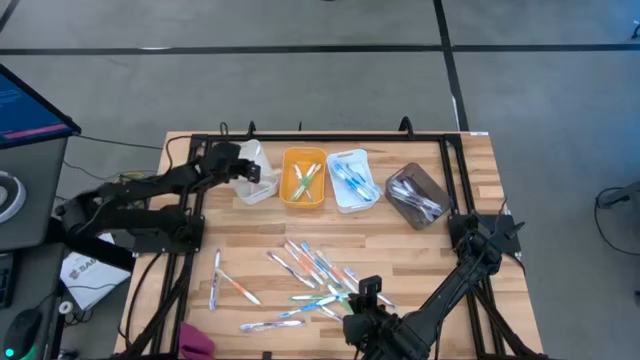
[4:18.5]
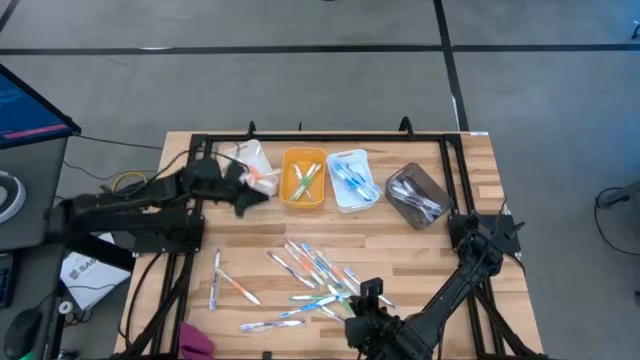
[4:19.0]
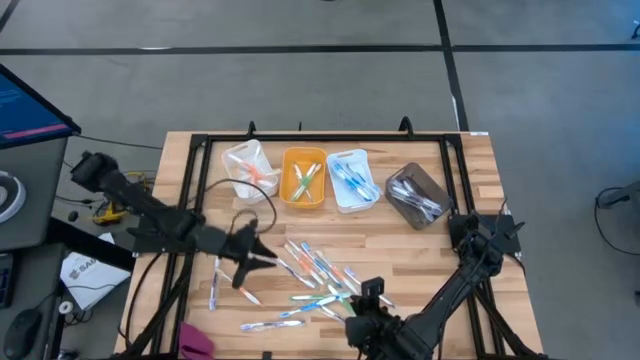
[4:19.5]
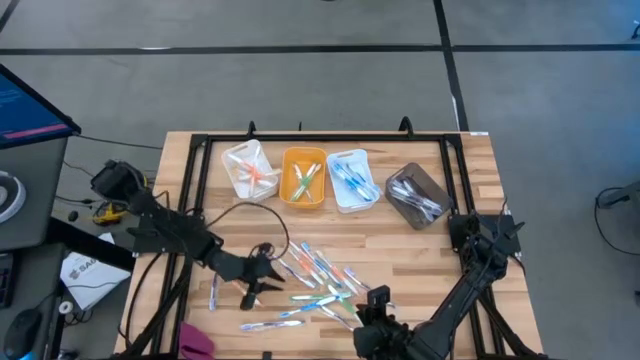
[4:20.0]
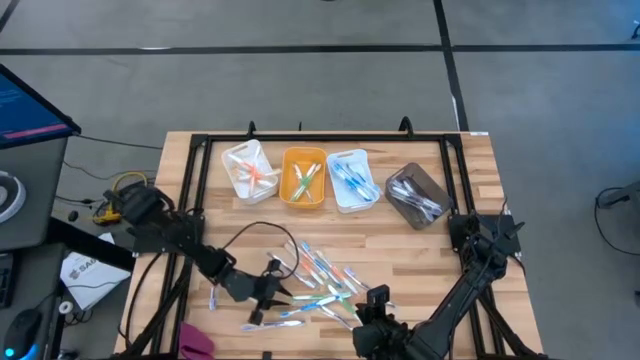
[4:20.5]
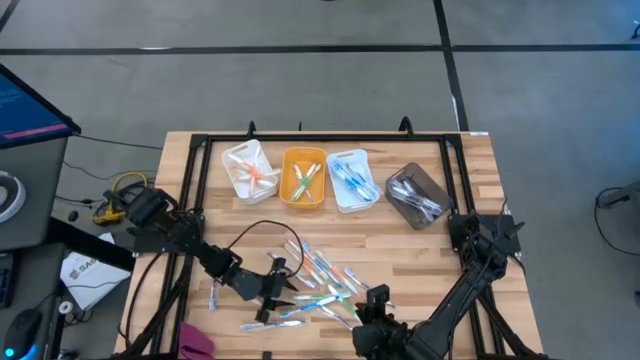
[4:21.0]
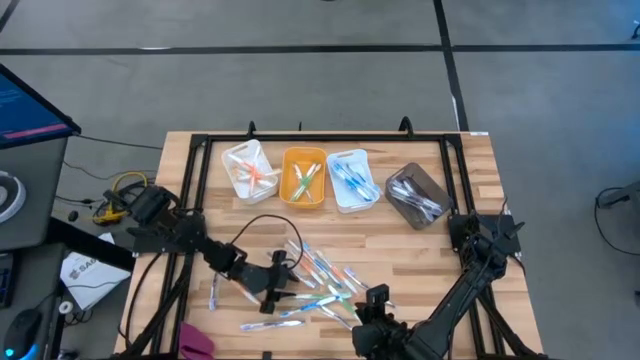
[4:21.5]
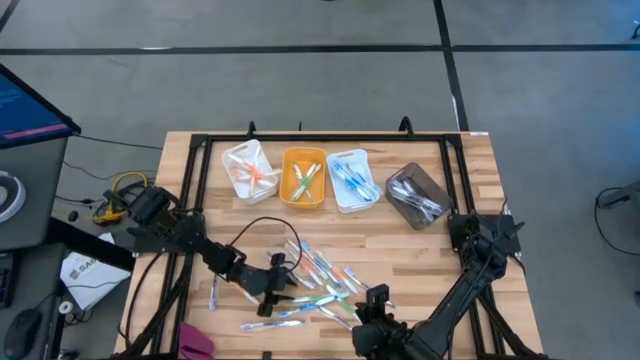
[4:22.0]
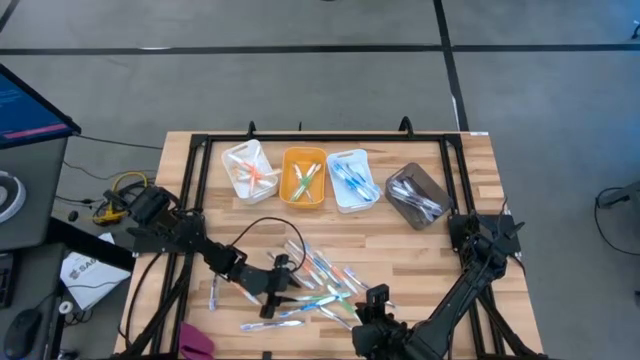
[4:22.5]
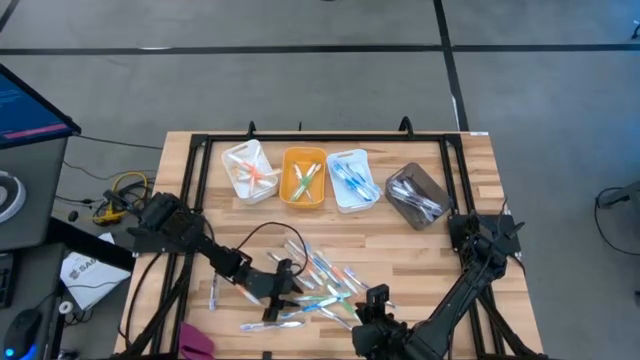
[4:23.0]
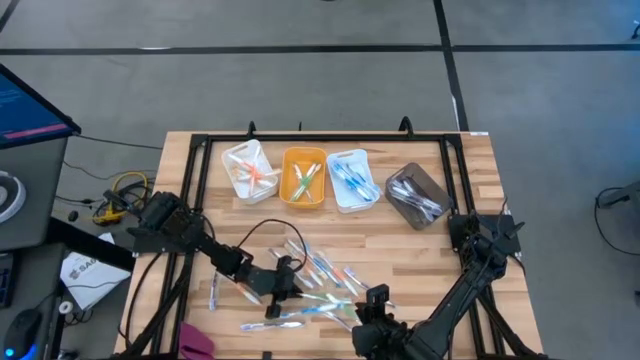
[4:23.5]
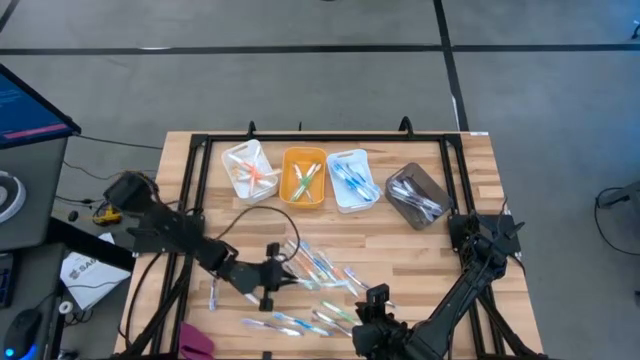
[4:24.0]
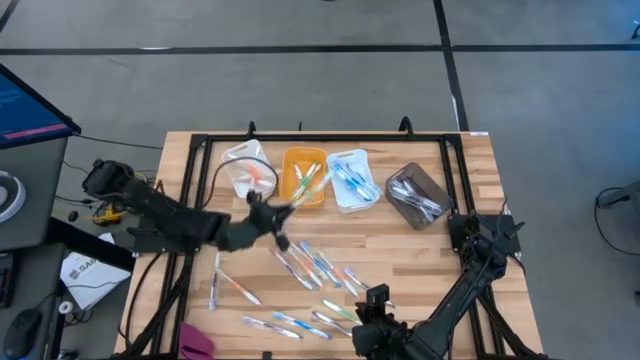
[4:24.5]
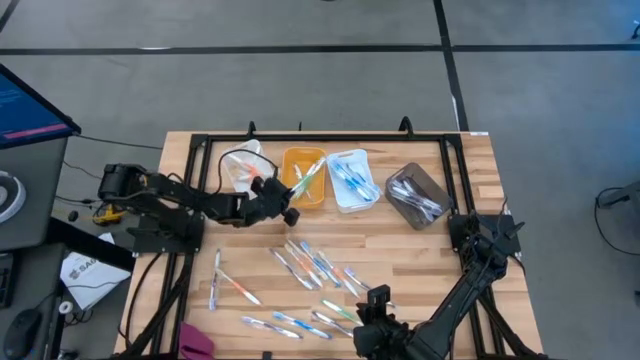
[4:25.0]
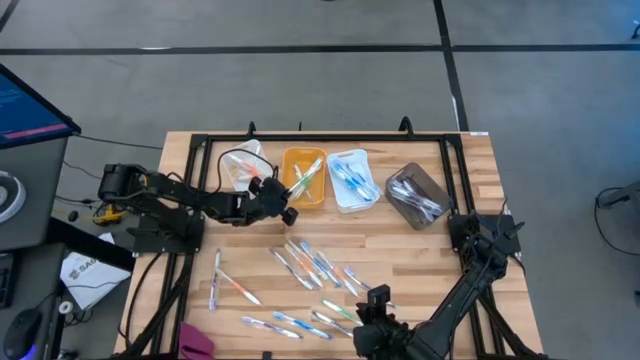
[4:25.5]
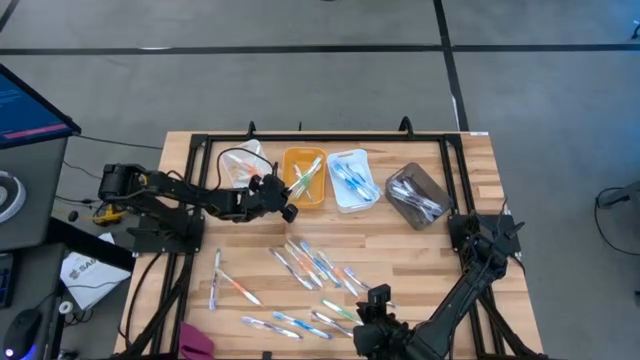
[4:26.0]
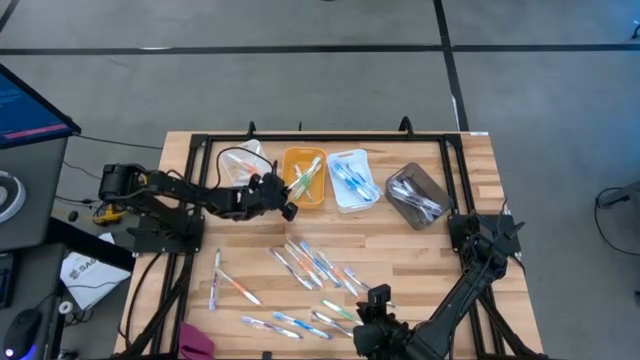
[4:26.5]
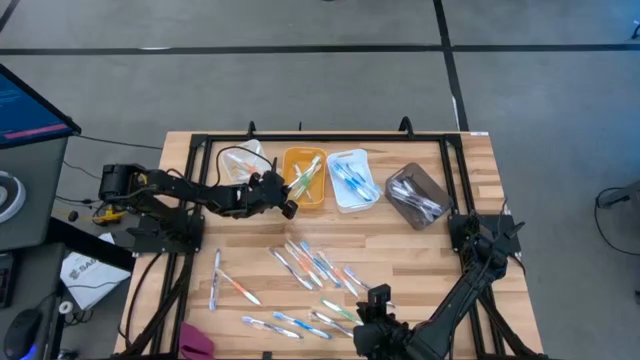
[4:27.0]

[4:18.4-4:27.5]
Task: Pick & Place Toothbrushes
Put the white green toothbrush into the yellow bin

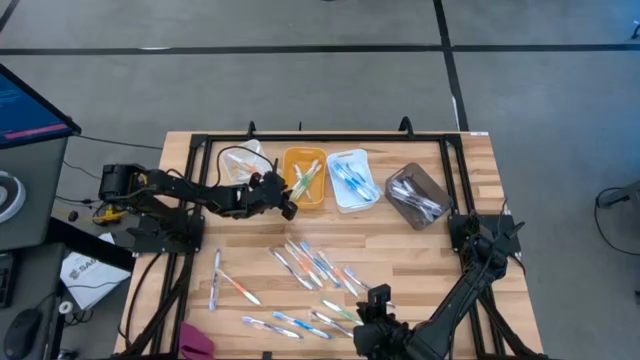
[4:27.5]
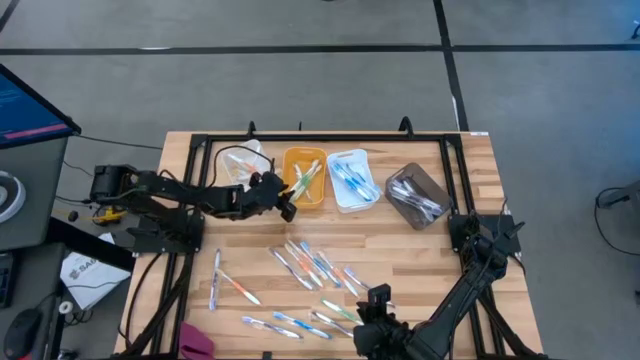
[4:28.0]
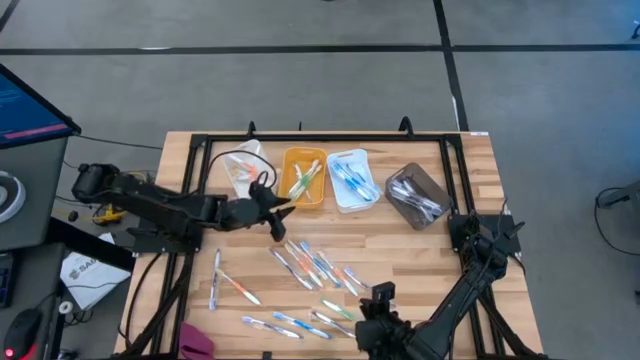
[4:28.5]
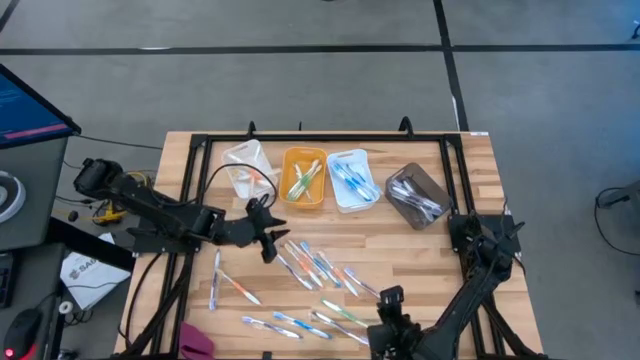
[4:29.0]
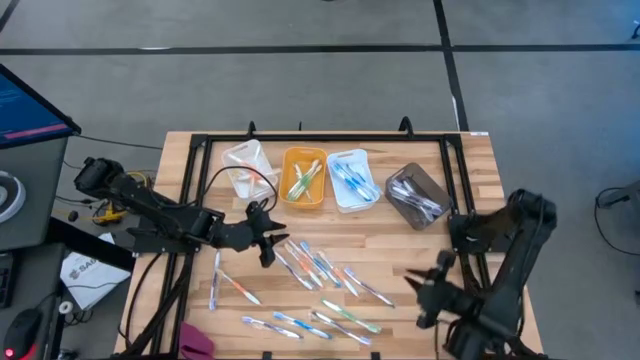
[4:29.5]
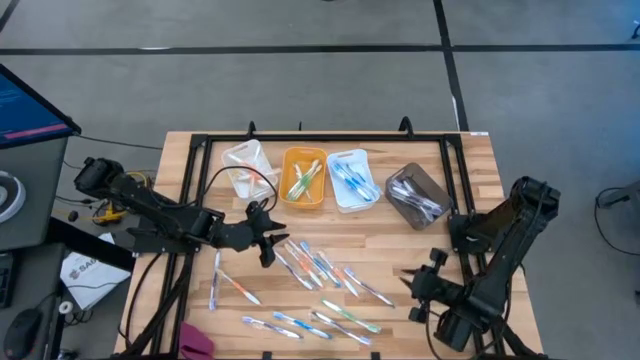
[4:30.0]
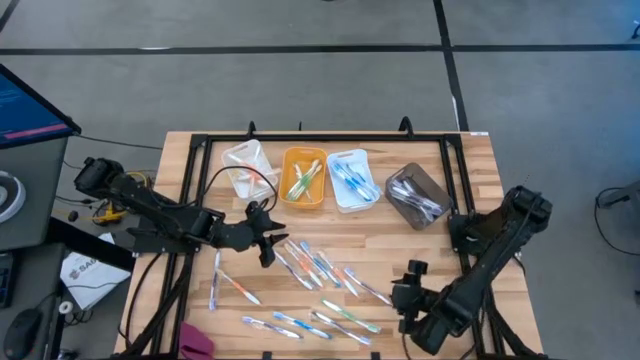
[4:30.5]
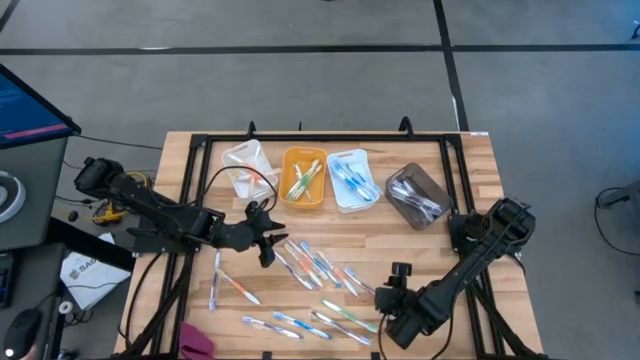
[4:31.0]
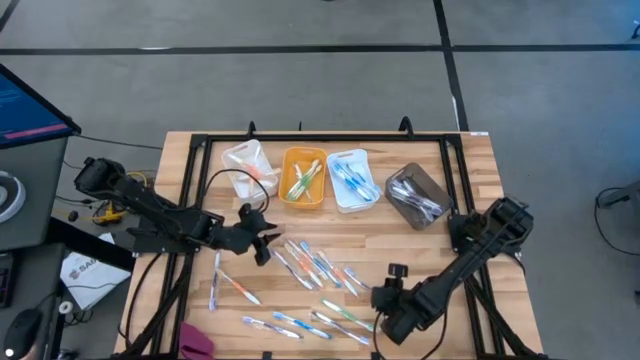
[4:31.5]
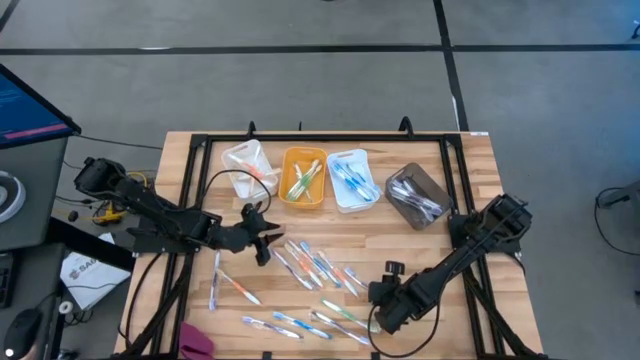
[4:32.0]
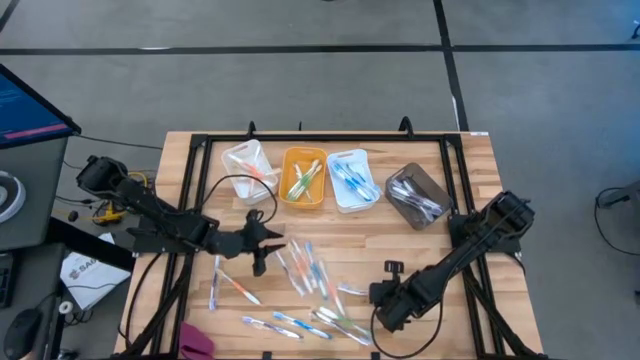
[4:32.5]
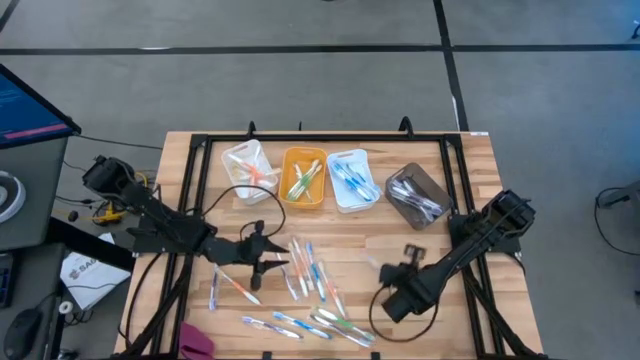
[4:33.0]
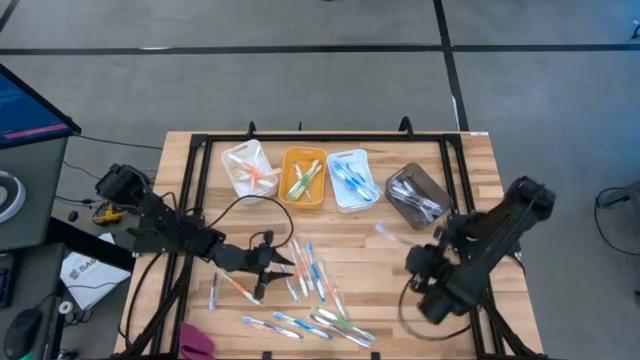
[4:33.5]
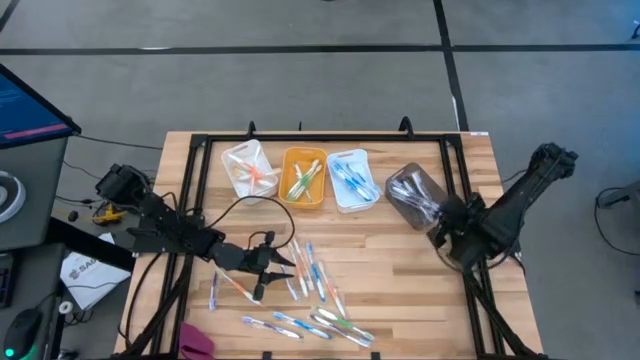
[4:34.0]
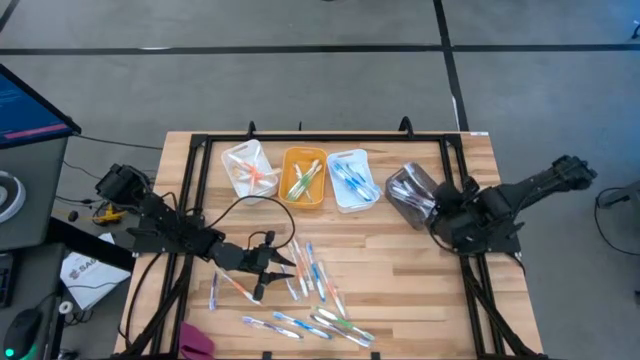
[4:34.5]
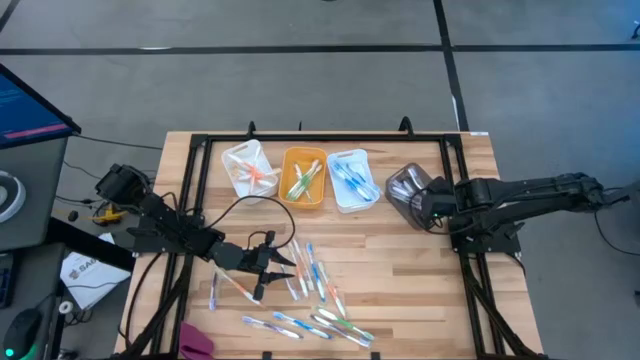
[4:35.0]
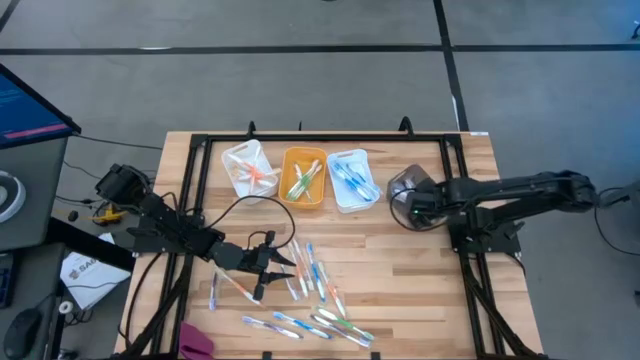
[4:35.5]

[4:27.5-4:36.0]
Put the white violet toothbrush into the black transparent bin

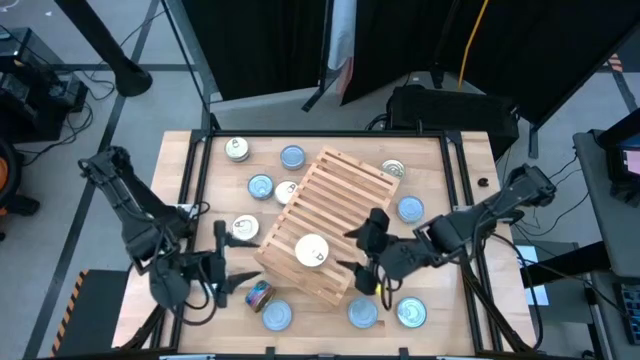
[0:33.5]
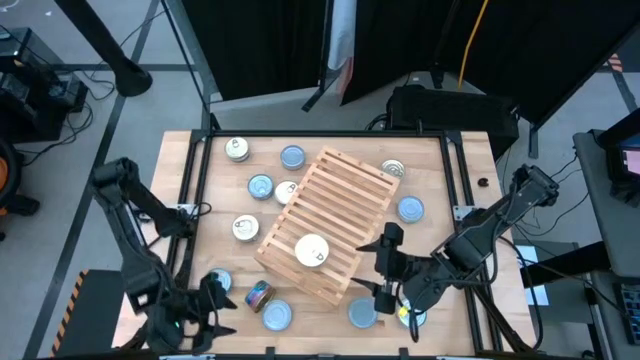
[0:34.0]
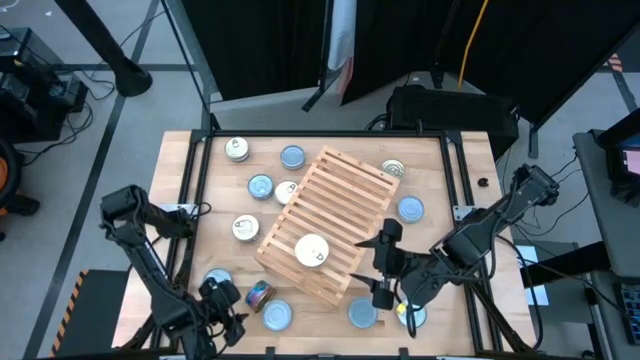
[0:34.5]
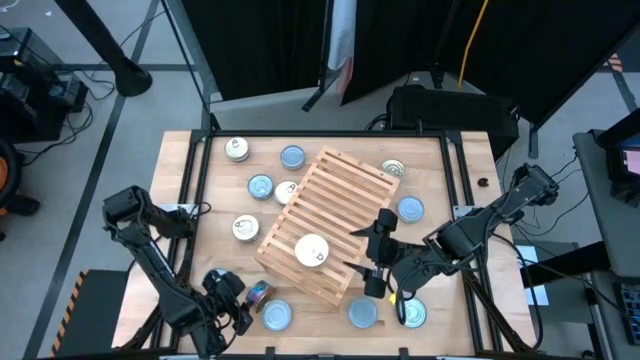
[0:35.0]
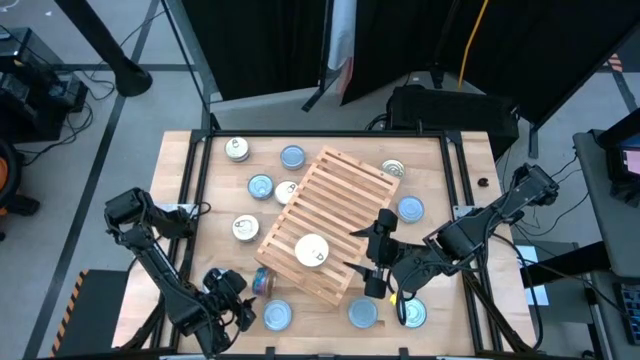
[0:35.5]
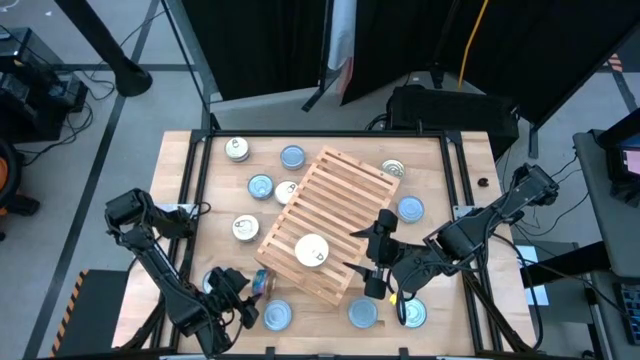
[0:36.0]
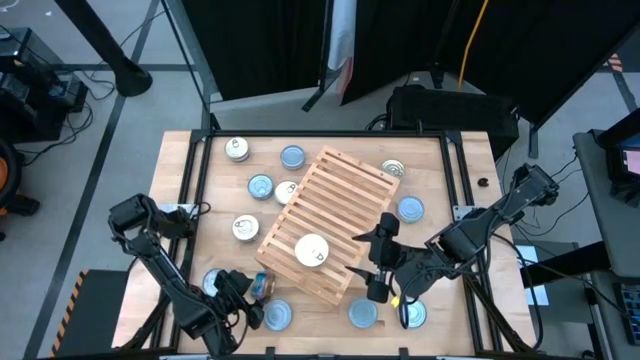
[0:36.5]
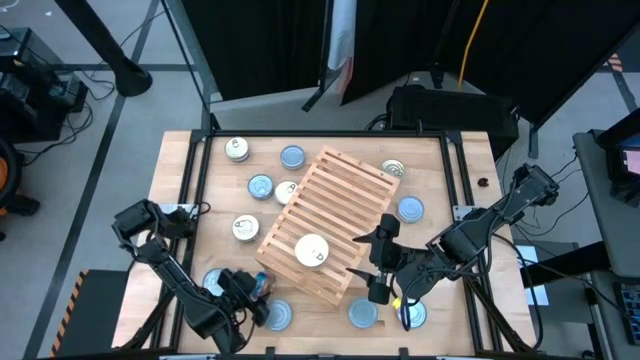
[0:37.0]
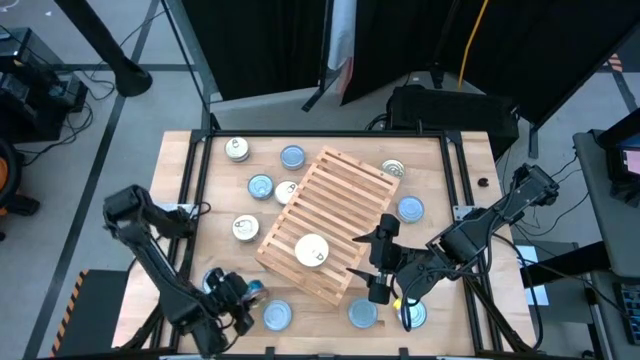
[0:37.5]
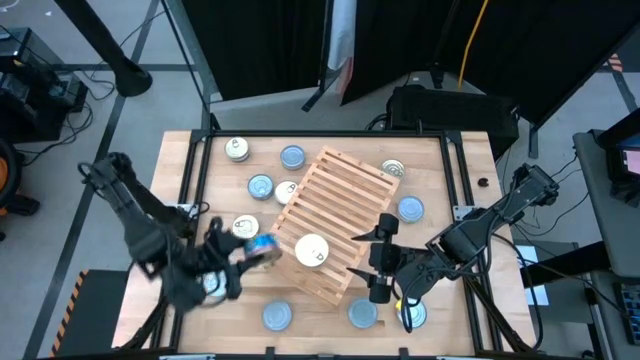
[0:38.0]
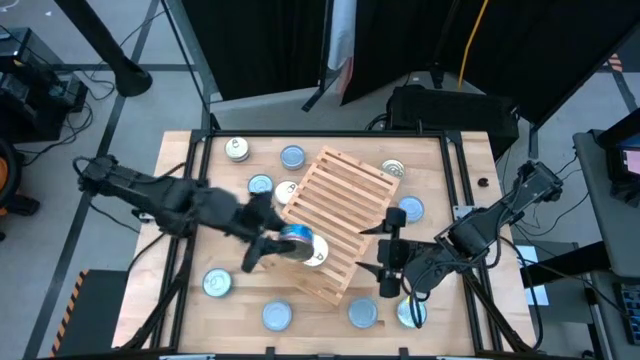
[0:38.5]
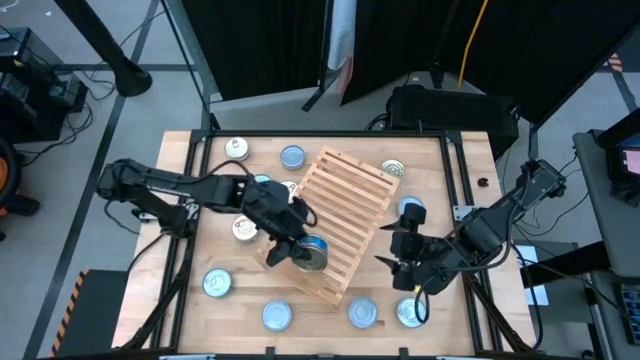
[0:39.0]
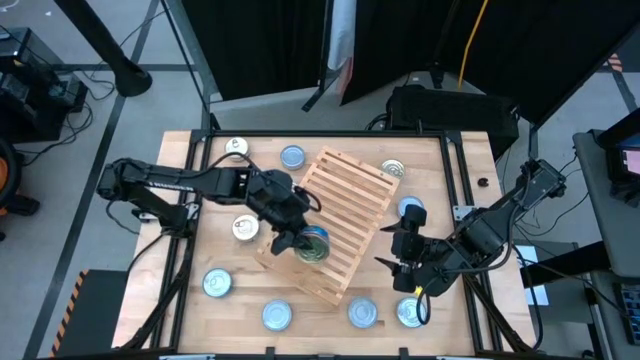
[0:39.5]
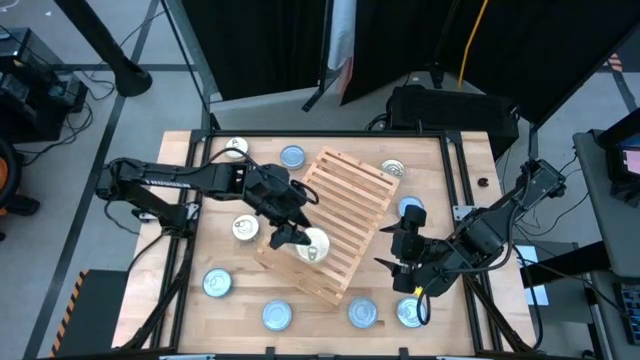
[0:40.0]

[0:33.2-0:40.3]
Task: Stack canned seafood by type on shelf
Stack the blue-pink tuna can on top of the other blue-pink tuna can on the shelf
